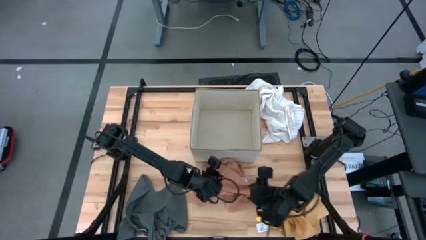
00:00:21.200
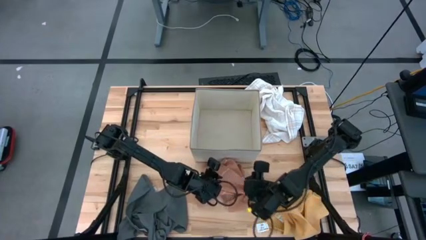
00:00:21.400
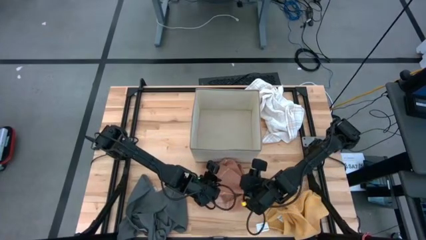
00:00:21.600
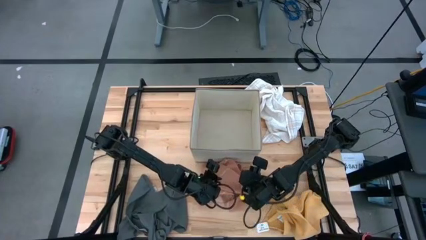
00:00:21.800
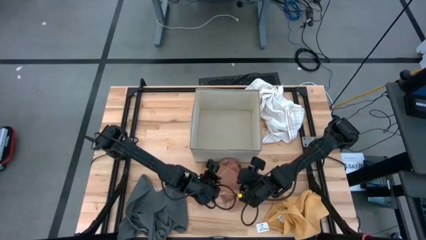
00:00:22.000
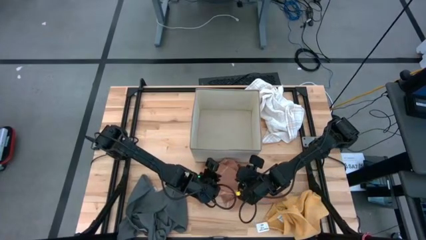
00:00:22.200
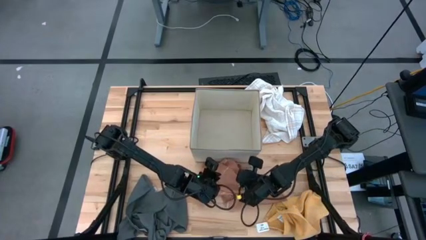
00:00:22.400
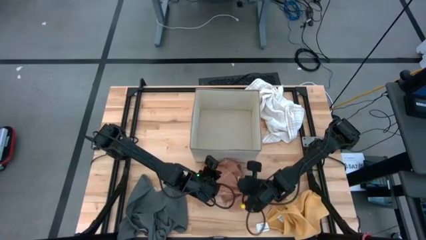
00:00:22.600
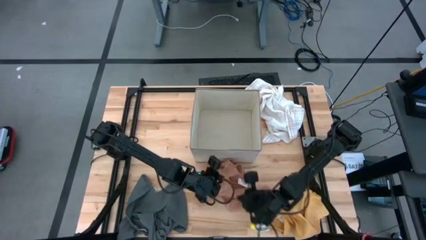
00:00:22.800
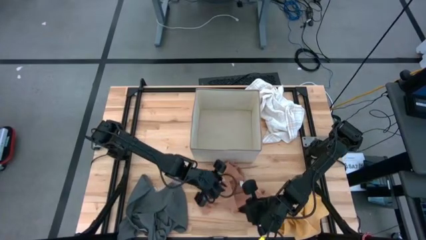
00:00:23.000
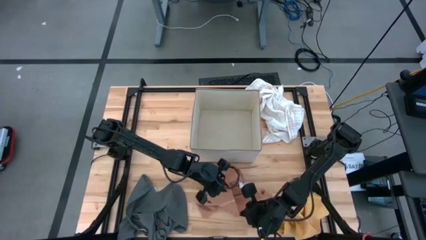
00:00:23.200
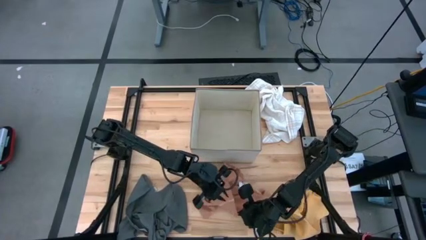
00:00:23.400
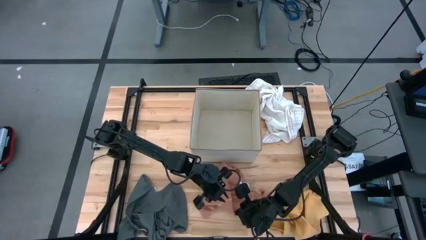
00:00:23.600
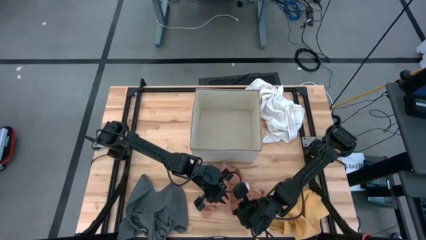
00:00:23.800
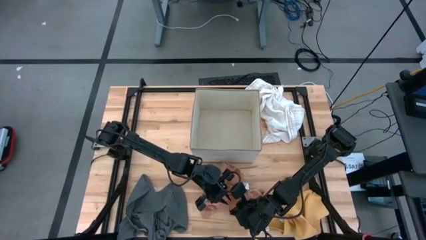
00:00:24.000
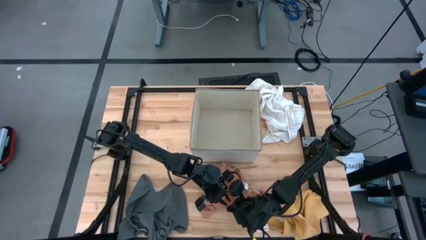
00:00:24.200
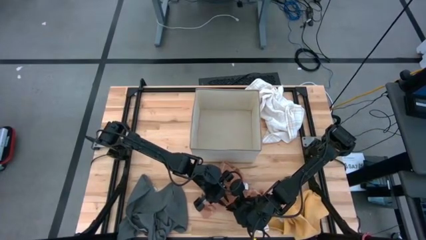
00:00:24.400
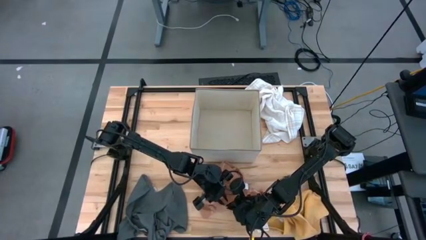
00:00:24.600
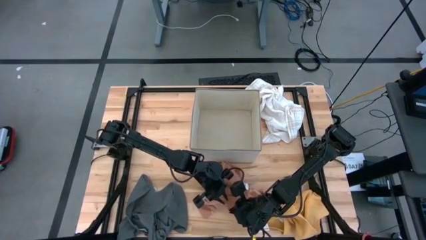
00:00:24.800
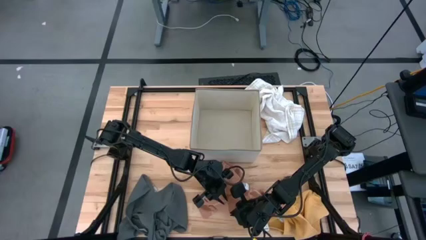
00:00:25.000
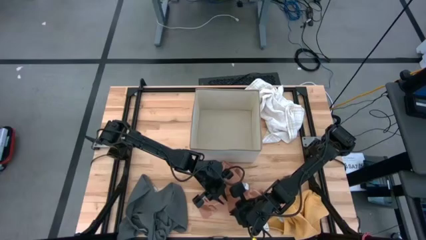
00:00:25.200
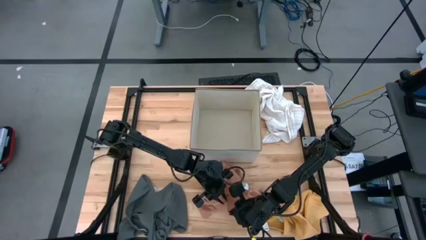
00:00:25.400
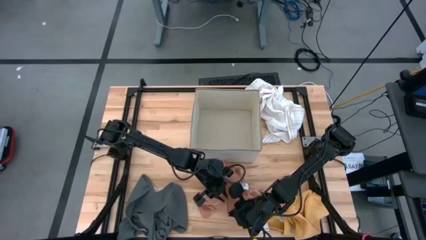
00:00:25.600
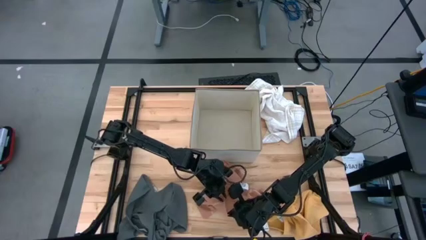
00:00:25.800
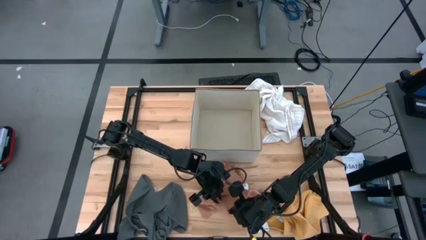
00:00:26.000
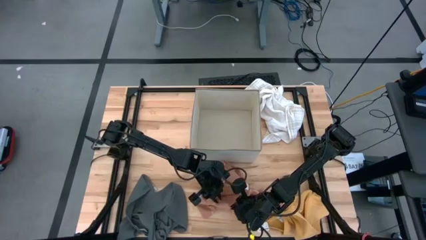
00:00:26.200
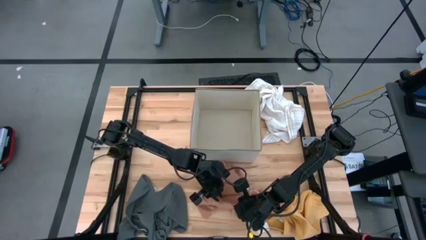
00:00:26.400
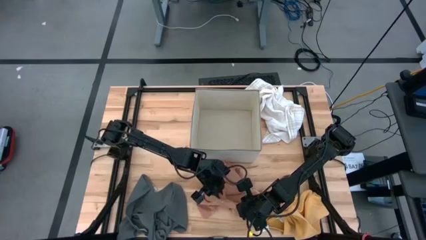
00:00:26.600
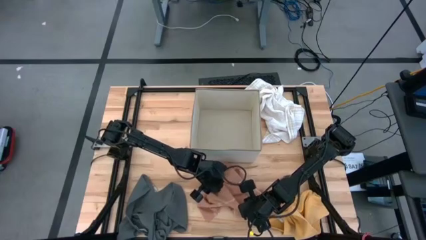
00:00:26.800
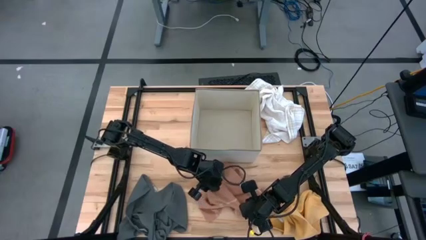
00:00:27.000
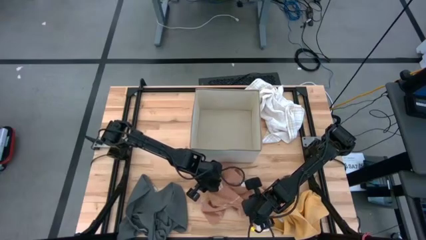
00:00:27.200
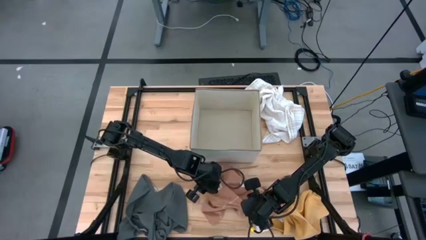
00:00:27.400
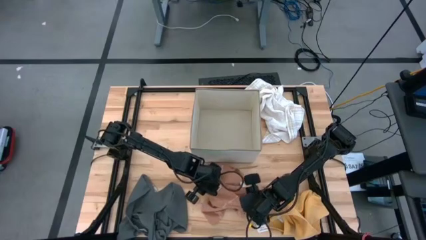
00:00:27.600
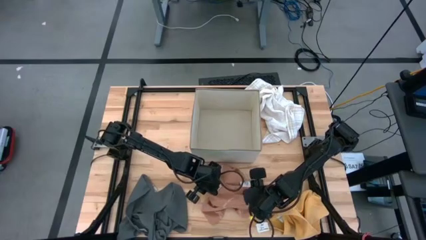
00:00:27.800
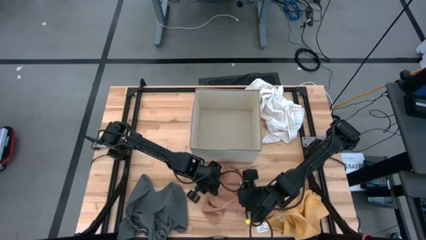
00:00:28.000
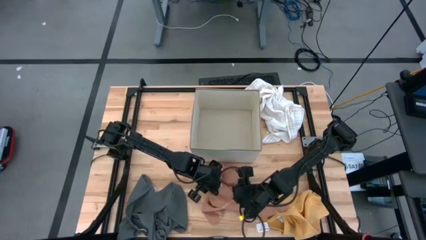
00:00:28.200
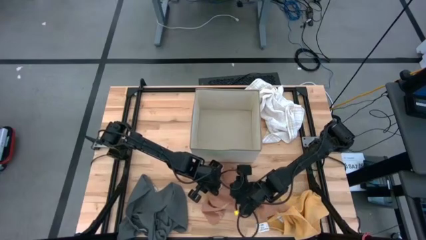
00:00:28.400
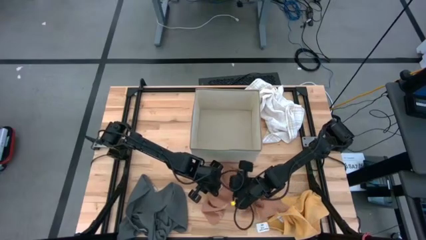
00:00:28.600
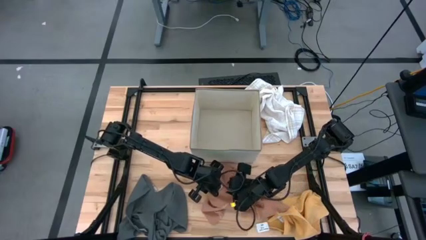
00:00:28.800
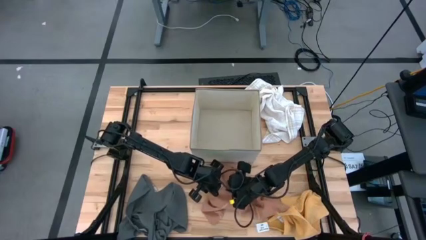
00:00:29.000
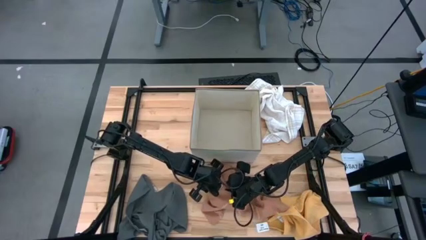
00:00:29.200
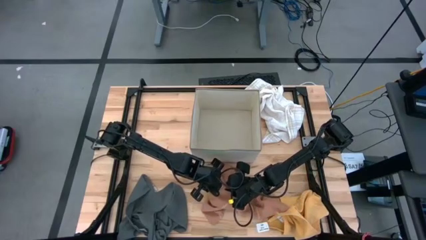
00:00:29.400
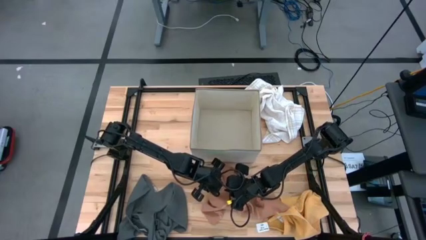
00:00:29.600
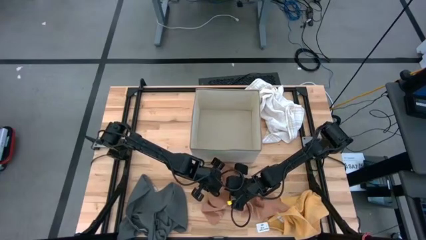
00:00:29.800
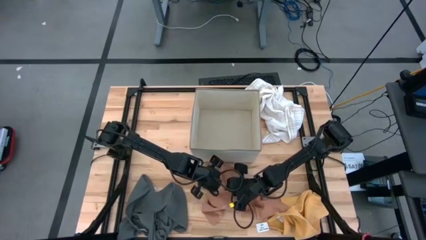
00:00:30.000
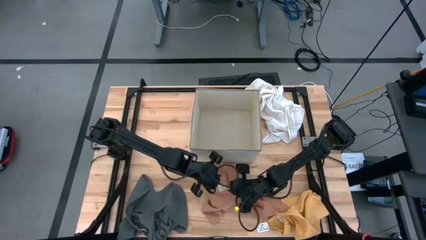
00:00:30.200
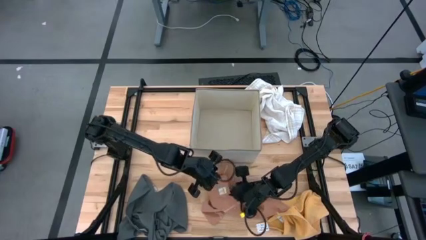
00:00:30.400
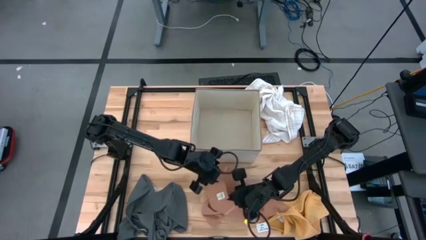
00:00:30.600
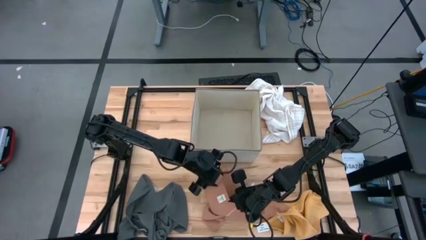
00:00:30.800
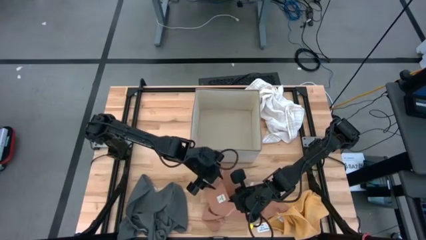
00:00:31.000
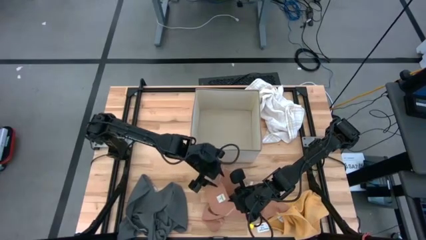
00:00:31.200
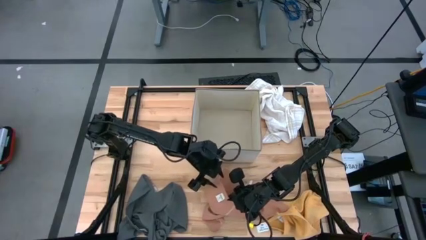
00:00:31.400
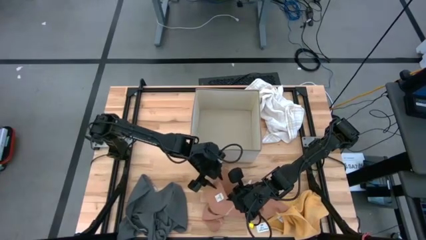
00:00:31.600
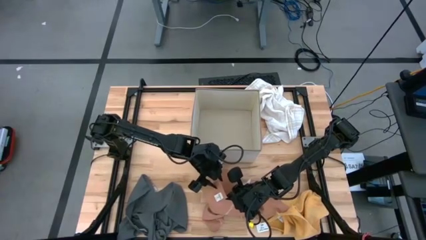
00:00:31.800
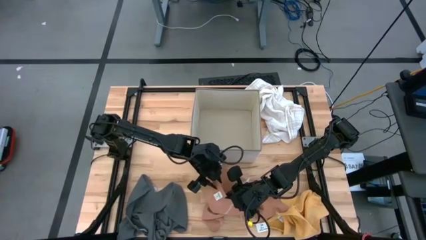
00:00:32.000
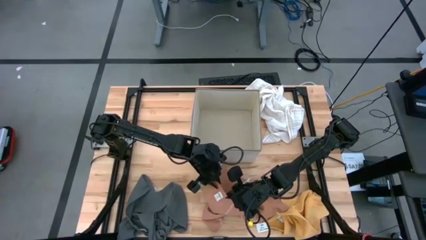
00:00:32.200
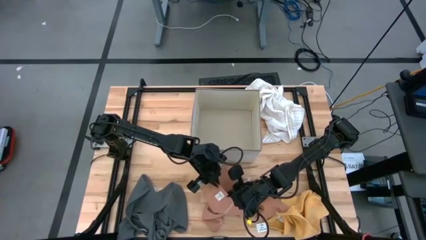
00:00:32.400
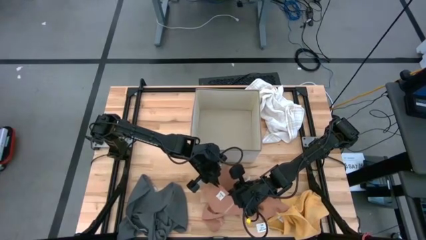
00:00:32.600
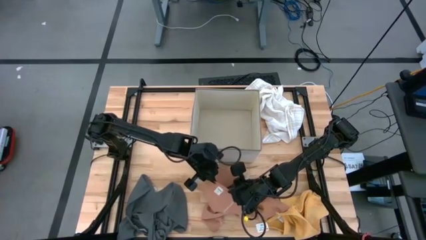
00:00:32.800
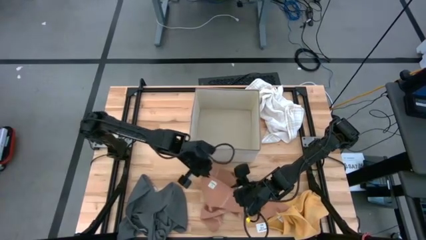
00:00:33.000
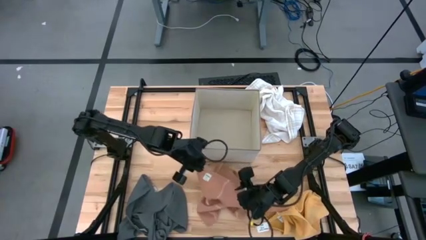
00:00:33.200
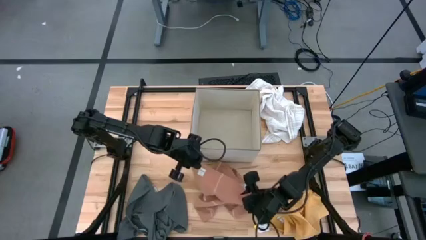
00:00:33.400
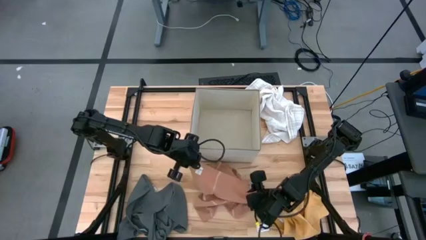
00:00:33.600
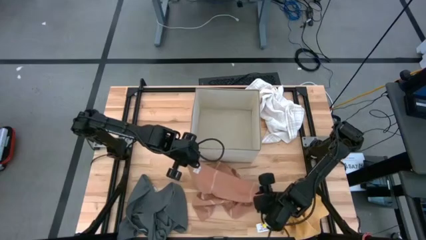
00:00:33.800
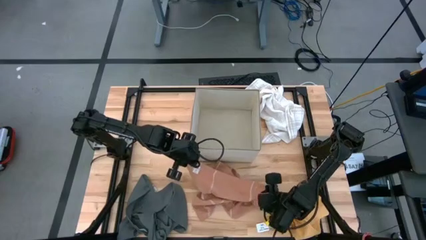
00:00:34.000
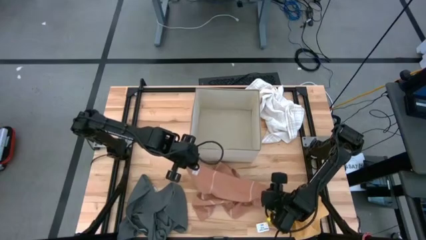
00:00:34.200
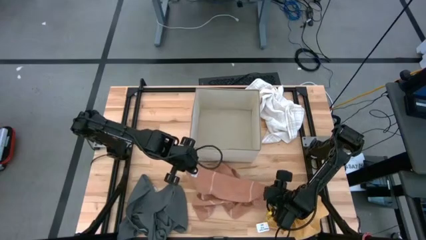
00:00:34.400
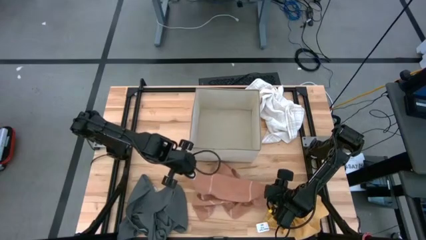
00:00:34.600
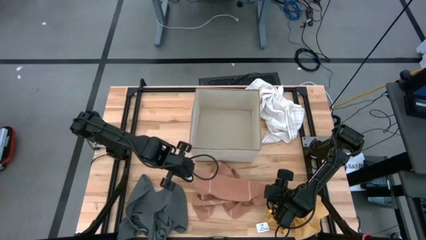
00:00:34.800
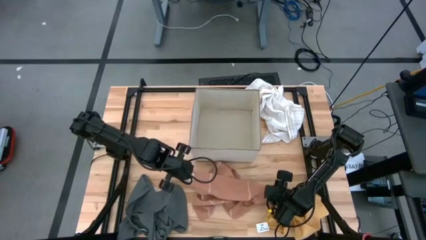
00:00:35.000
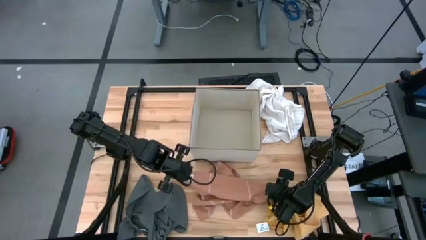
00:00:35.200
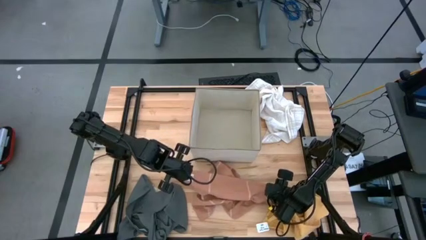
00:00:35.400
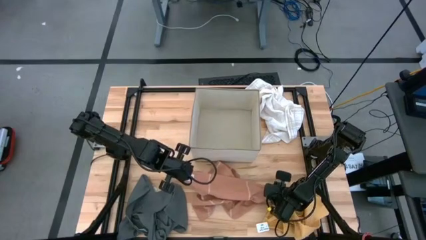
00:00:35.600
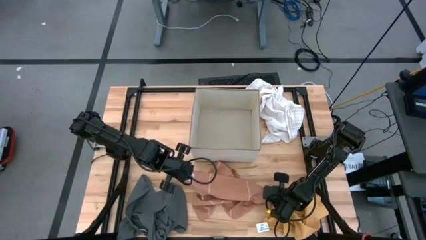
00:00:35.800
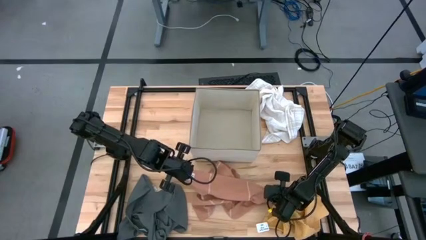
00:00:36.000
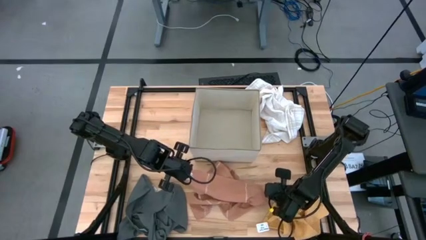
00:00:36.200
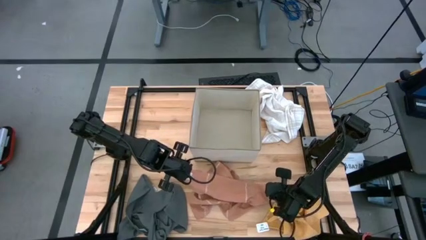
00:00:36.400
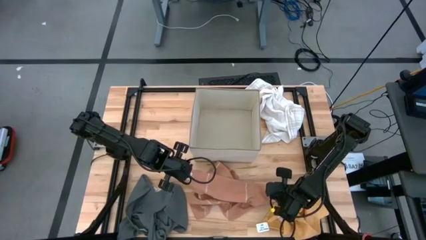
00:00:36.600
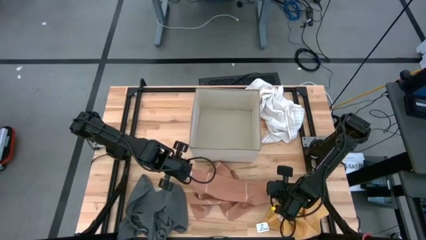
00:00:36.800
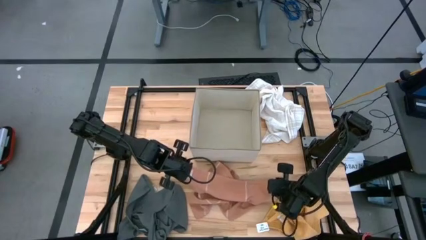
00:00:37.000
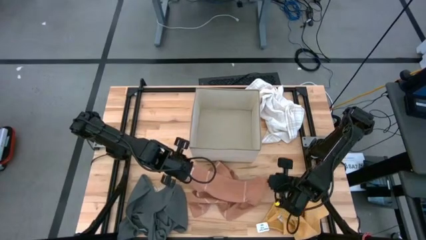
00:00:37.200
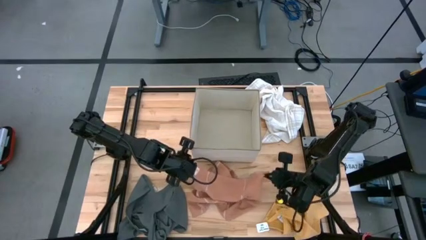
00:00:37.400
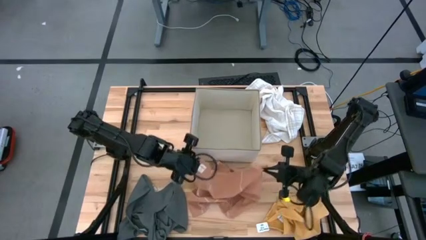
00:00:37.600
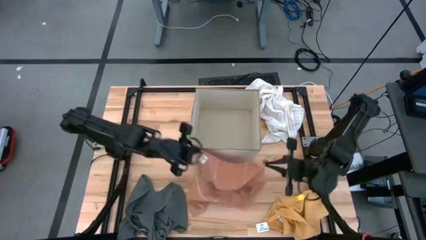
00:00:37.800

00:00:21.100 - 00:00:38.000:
Task: Fold towel
Fold the brown towel
